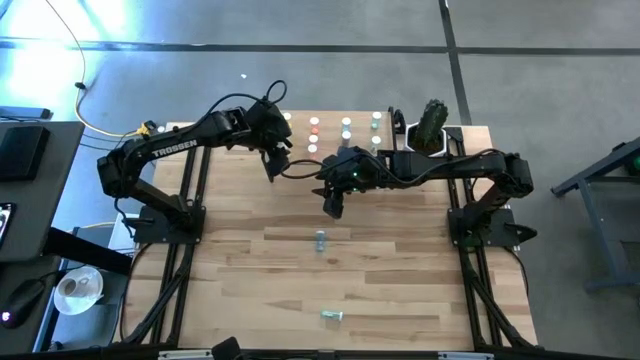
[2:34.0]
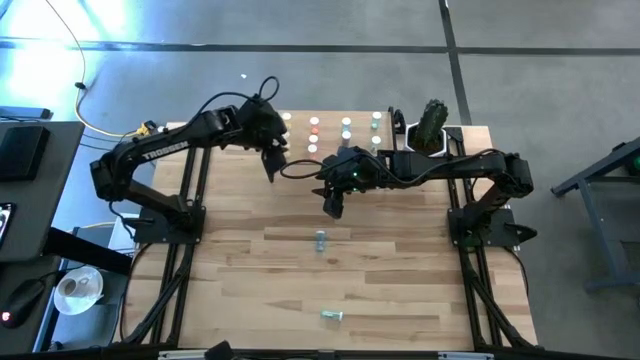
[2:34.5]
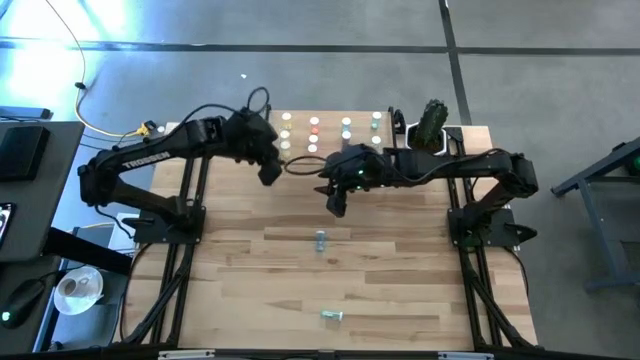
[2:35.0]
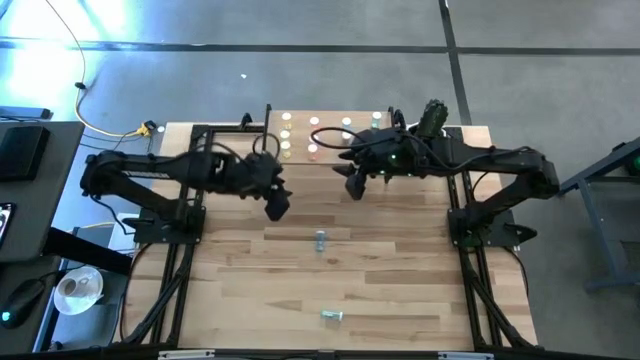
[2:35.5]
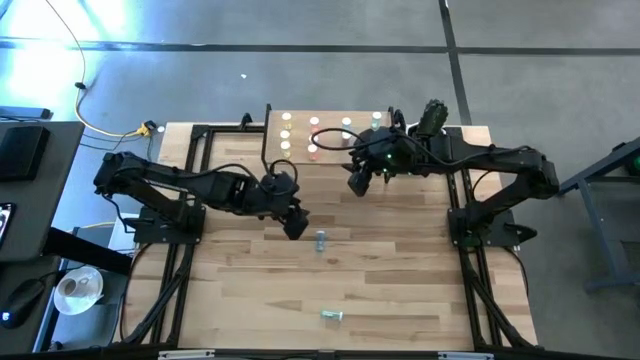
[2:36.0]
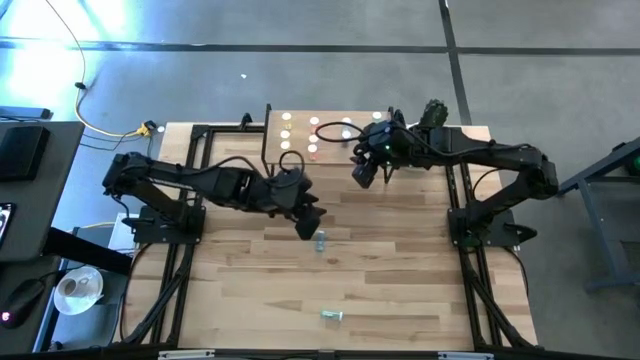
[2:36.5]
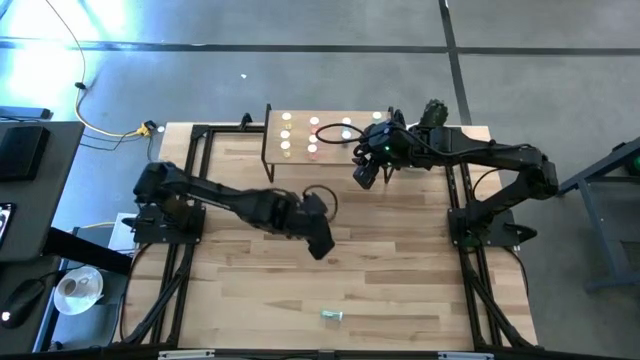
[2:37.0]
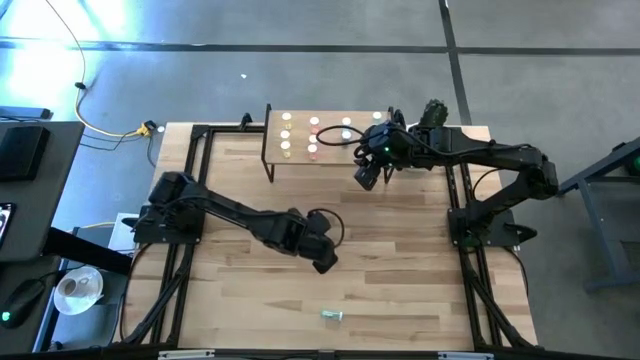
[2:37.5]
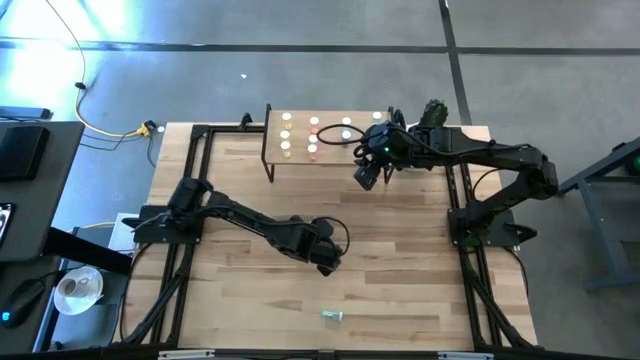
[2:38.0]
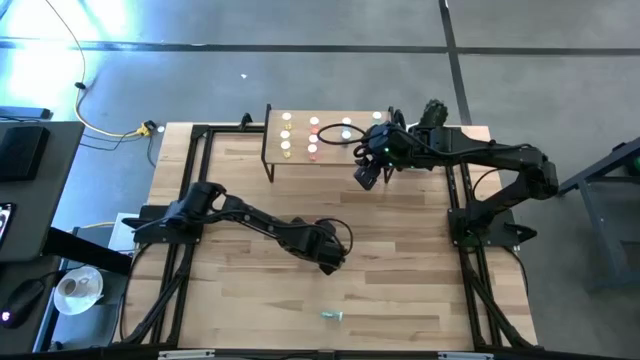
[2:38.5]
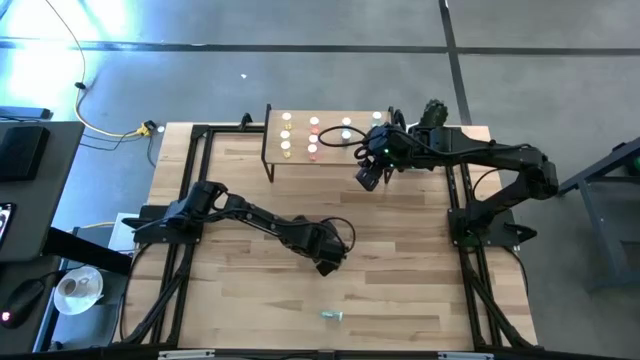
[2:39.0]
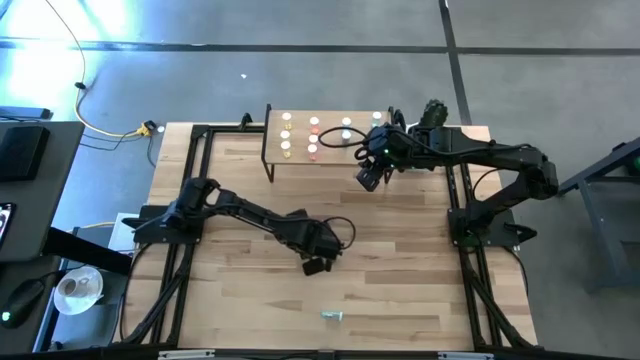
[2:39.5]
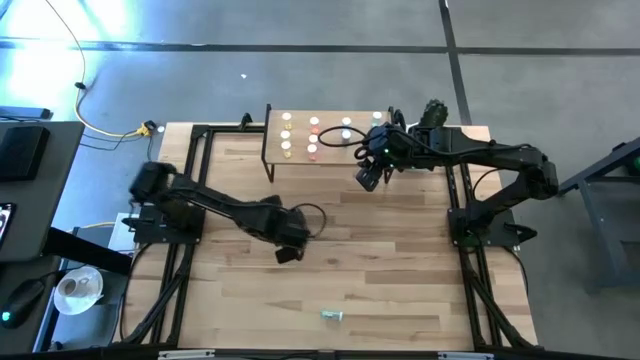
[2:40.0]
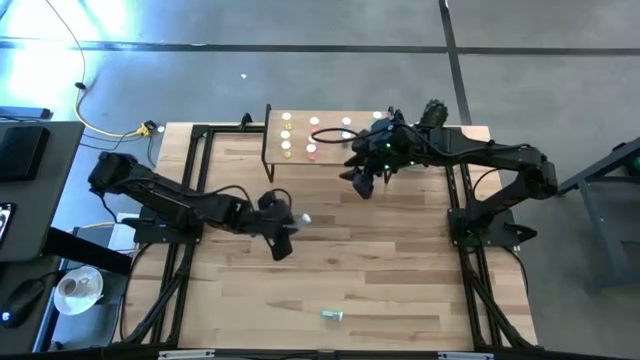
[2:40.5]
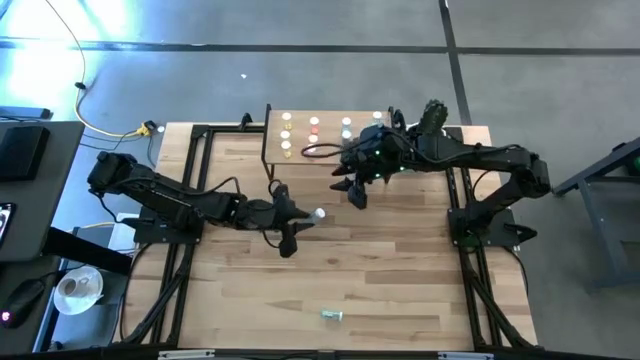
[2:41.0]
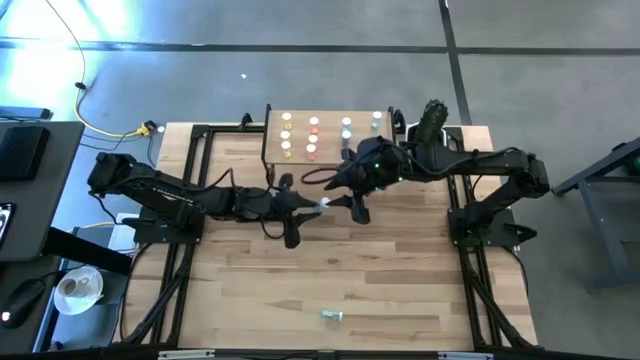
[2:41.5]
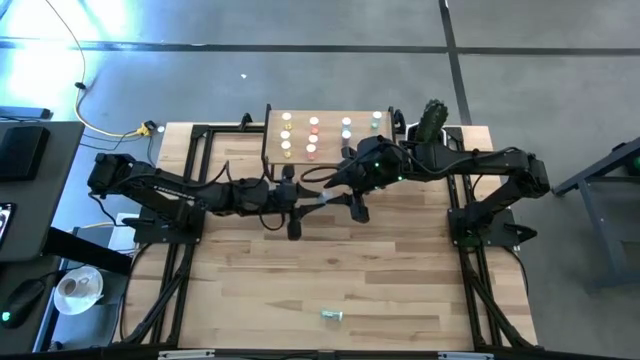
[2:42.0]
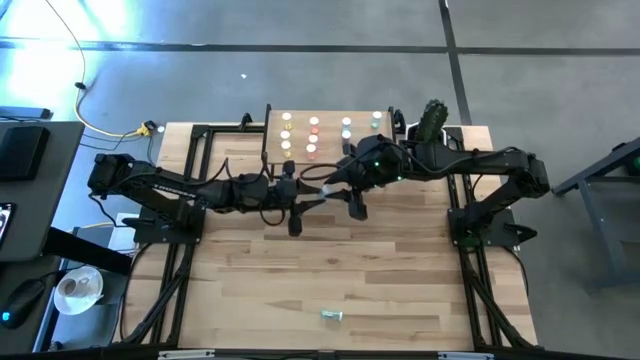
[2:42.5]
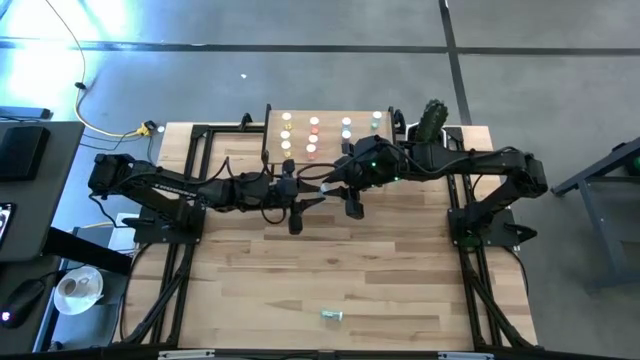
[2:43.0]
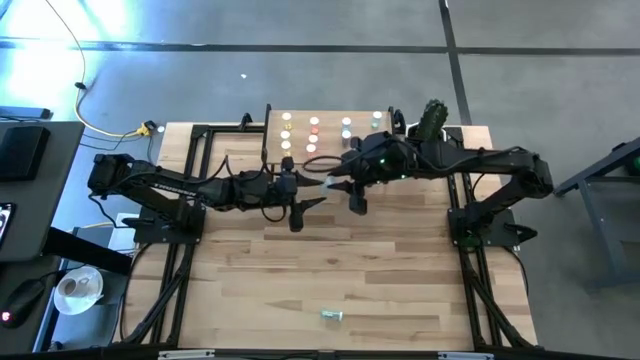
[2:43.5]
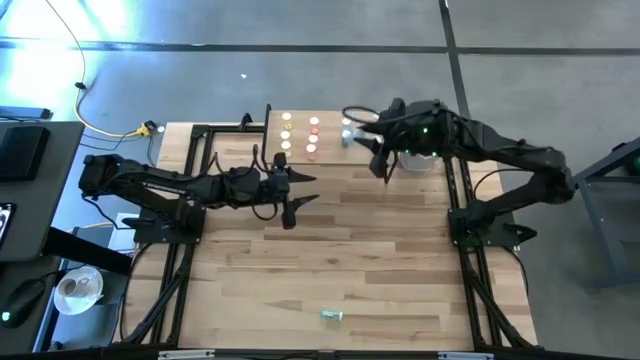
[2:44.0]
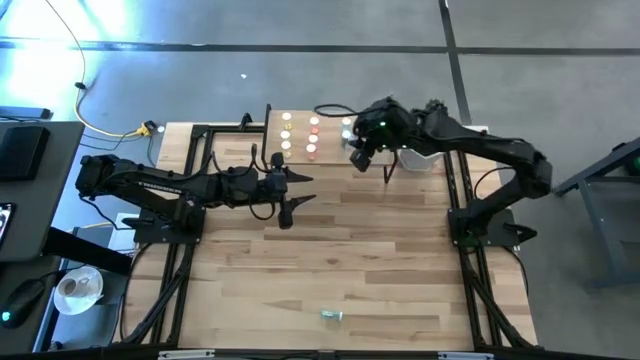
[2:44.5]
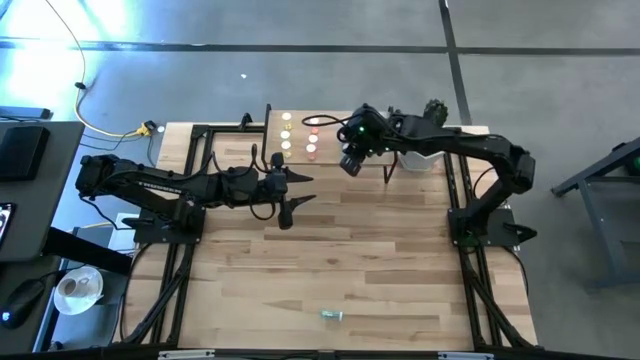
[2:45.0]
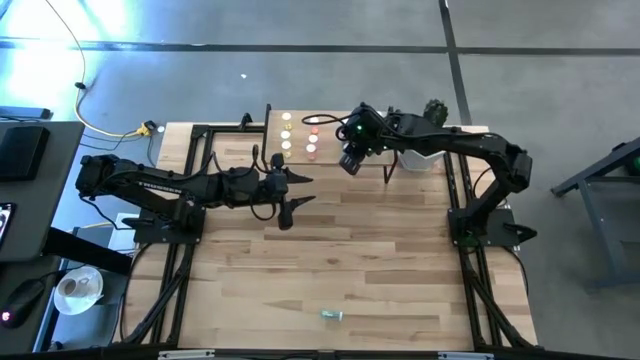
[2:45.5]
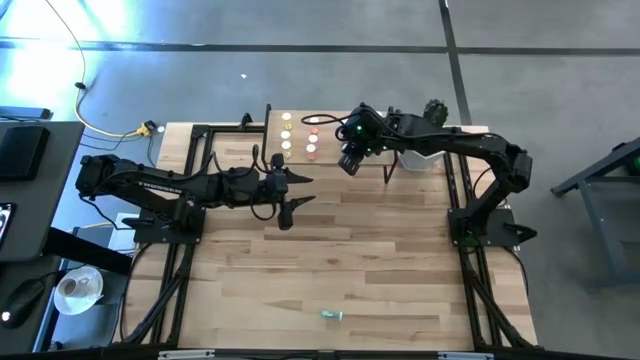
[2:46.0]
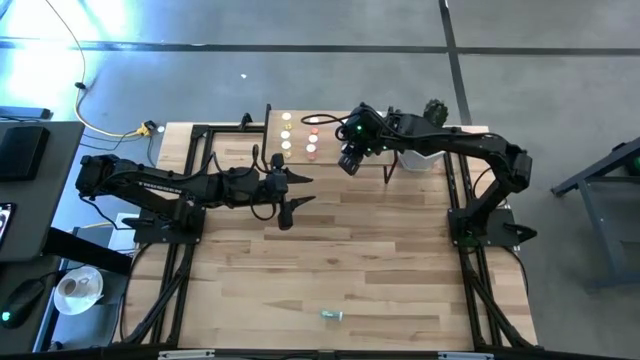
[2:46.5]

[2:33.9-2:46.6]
Task: Pick and place medicine bottles onto shelf by color
Put the blue pill bottle on the shelf aligned with the other blue pill bottles

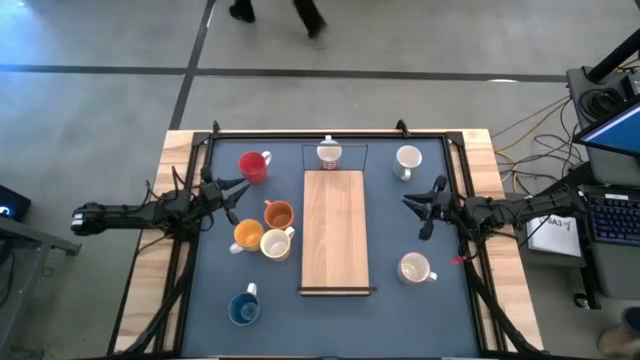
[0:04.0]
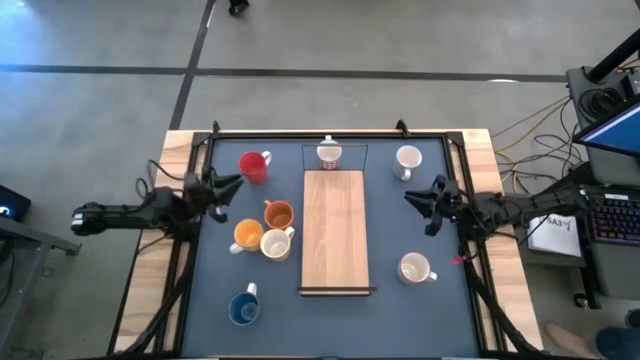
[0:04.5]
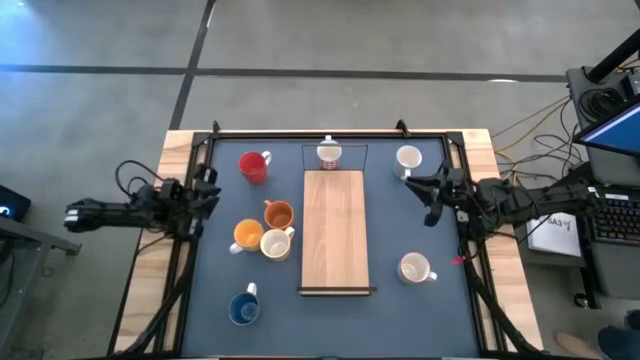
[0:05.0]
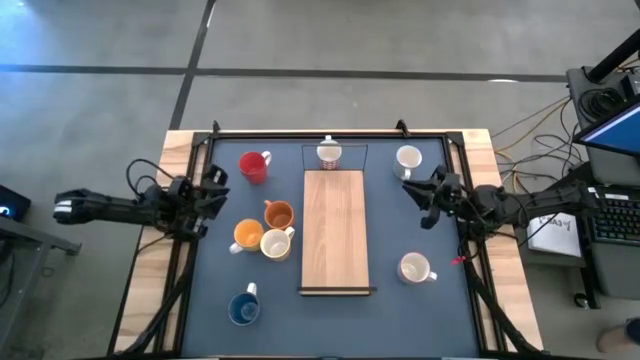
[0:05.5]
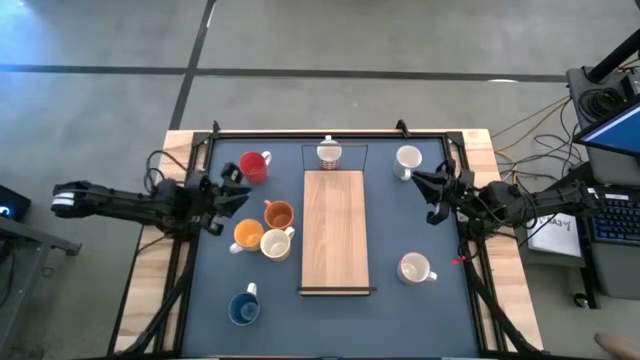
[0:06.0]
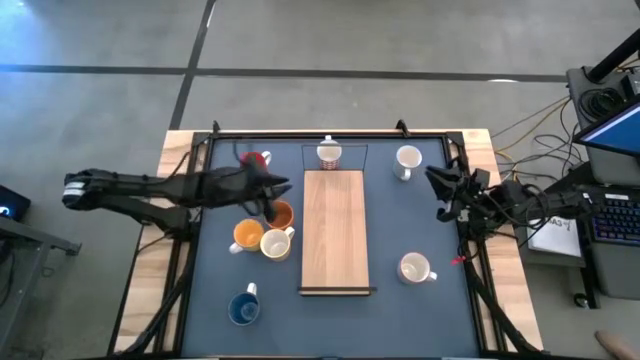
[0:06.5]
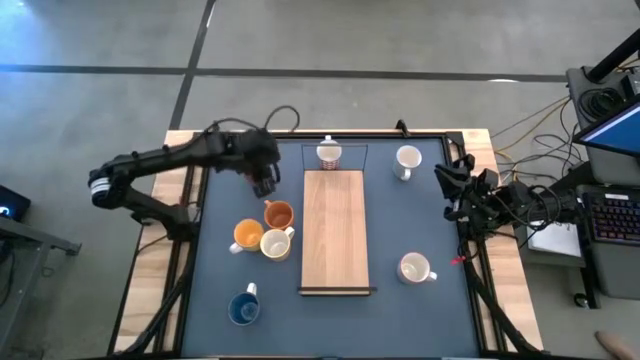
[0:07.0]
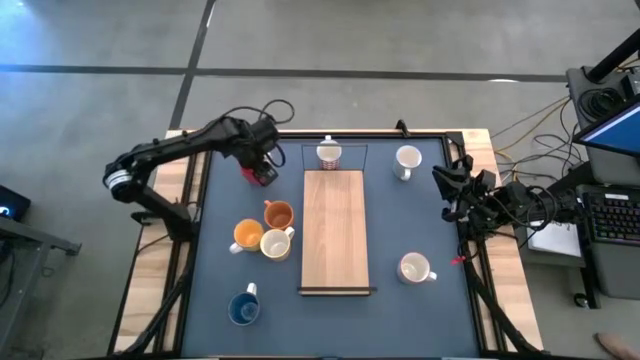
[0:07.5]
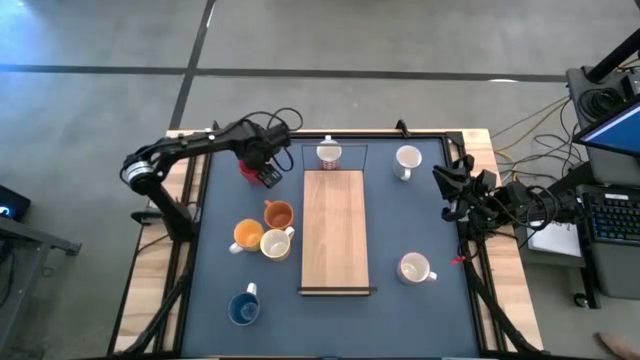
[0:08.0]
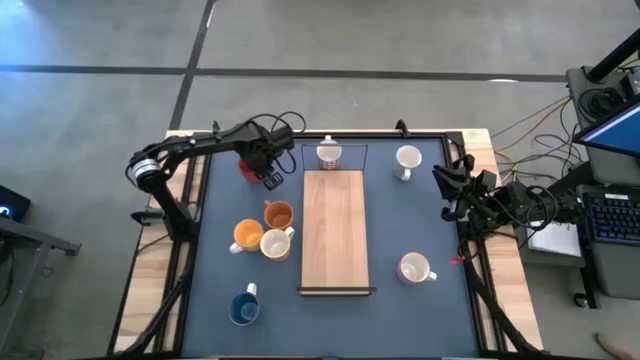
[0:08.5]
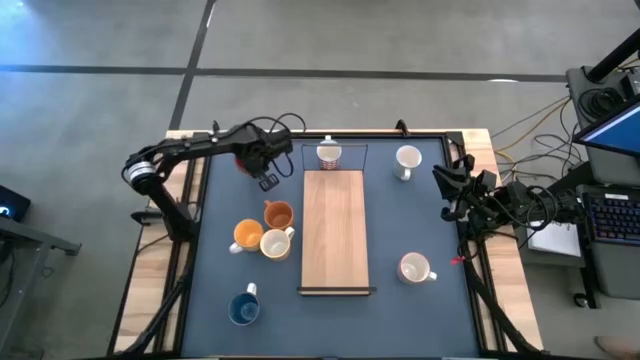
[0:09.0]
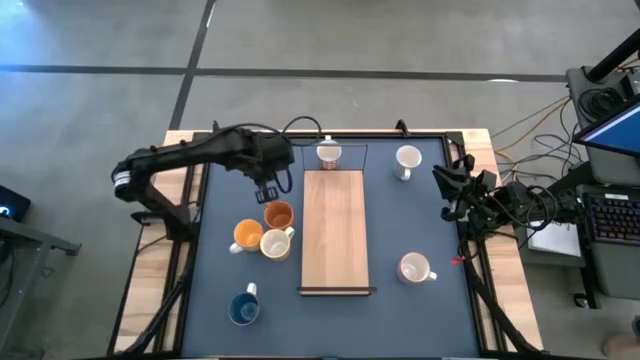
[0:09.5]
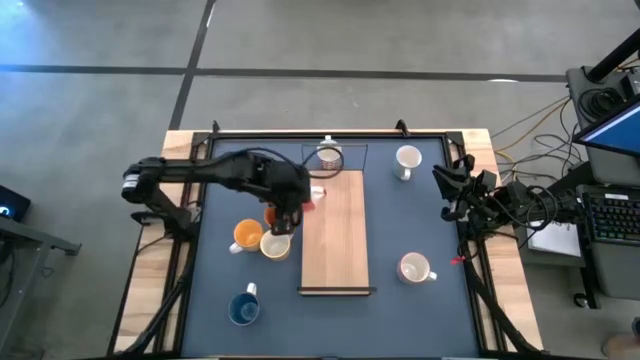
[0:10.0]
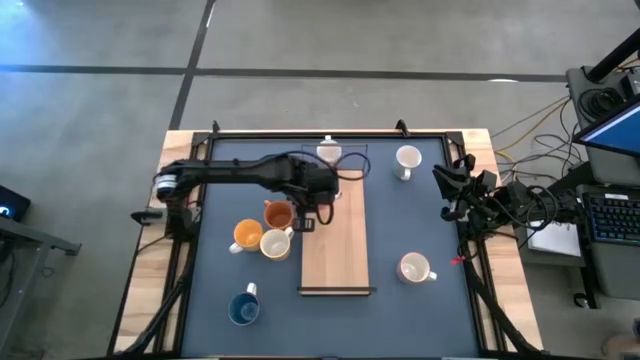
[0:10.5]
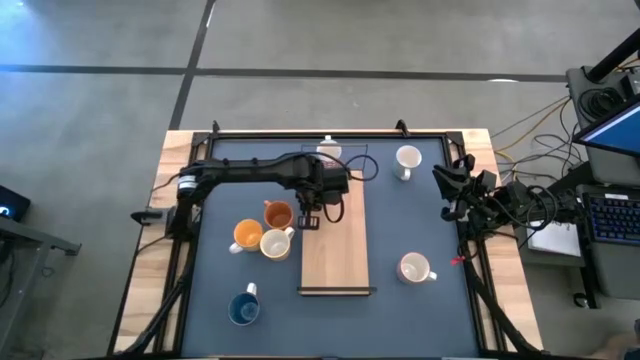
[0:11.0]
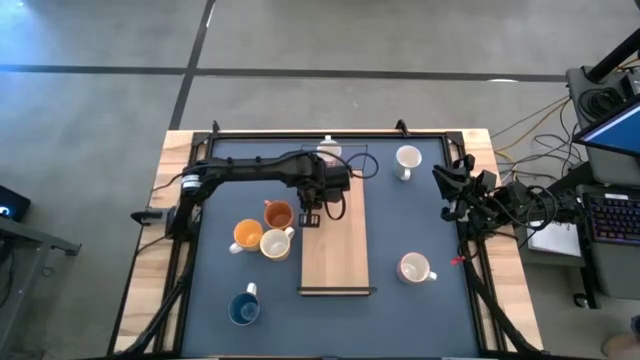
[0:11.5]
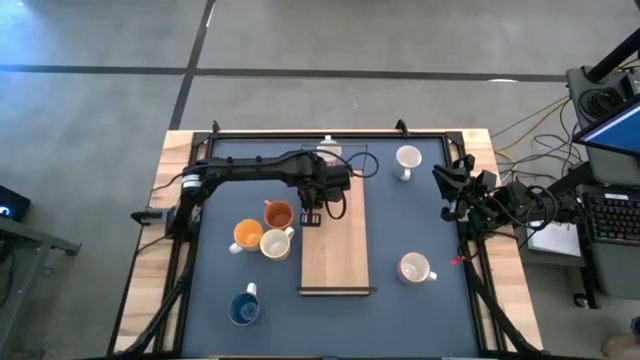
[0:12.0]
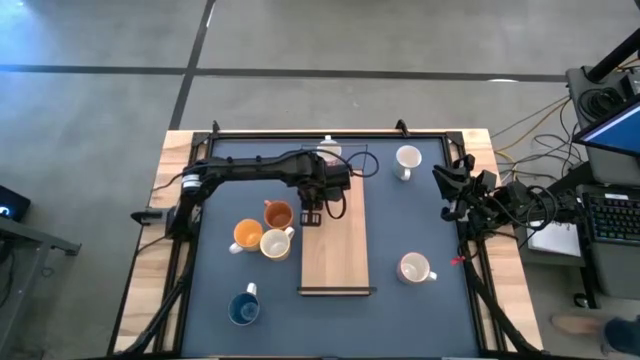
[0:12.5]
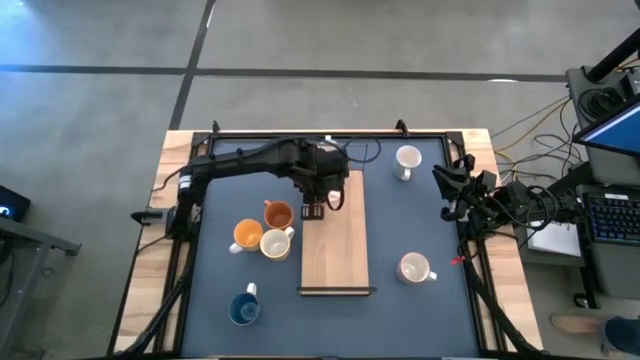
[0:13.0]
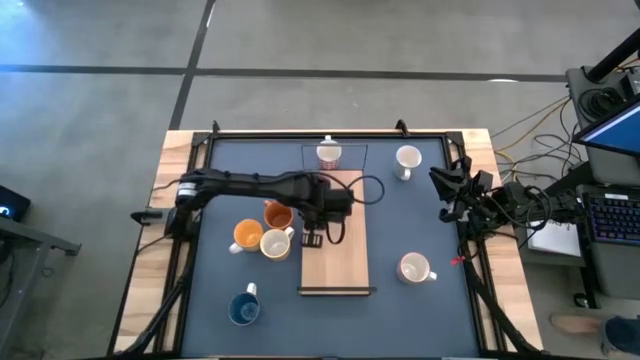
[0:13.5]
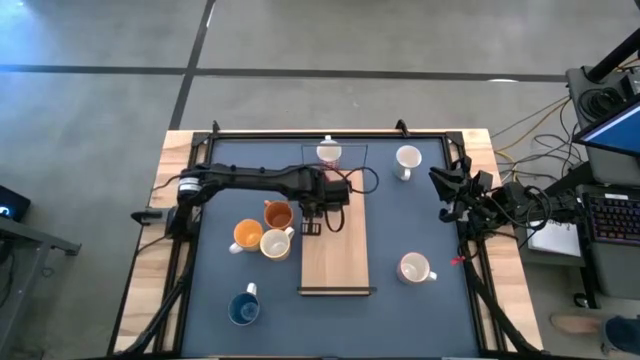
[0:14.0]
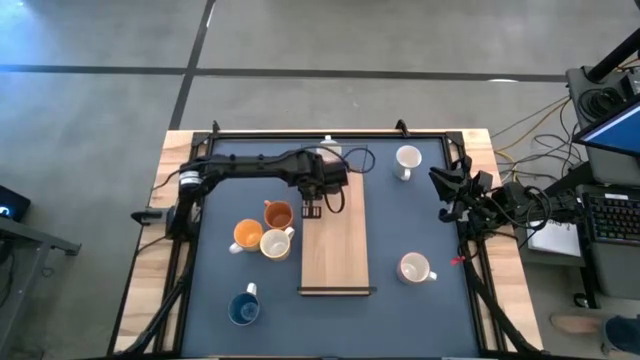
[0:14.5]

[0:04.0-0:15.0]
Task: Place coffee mugs
Put the red mug on the shelf
